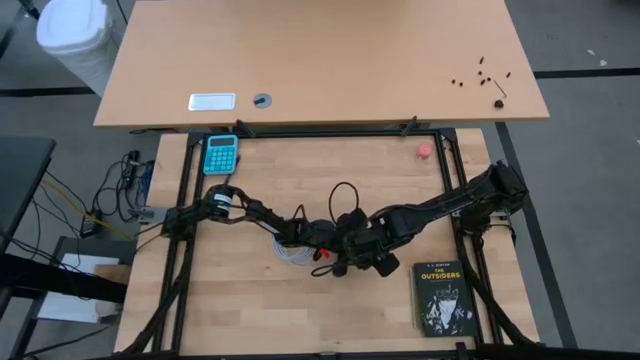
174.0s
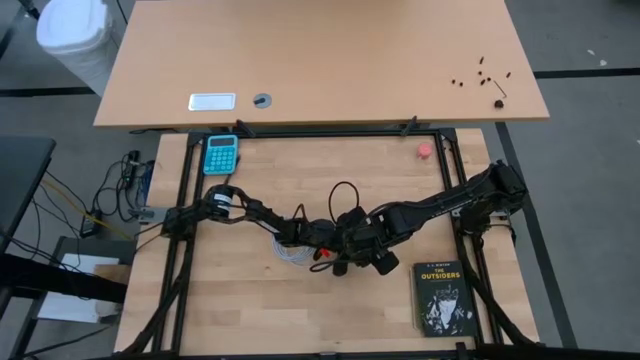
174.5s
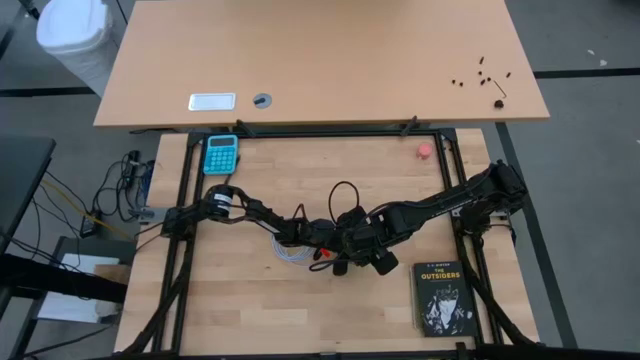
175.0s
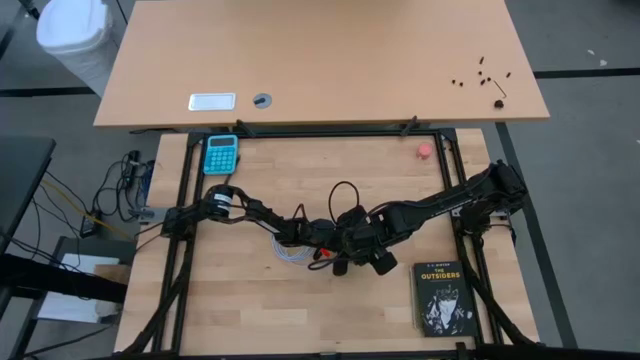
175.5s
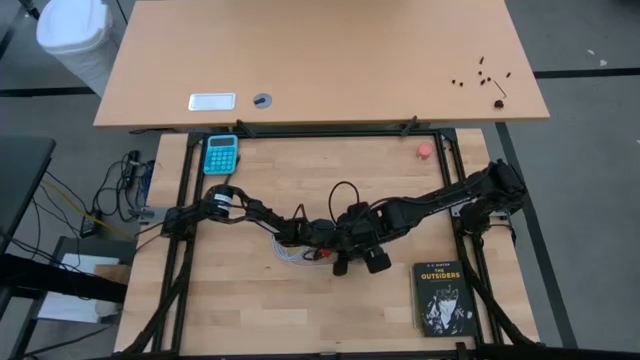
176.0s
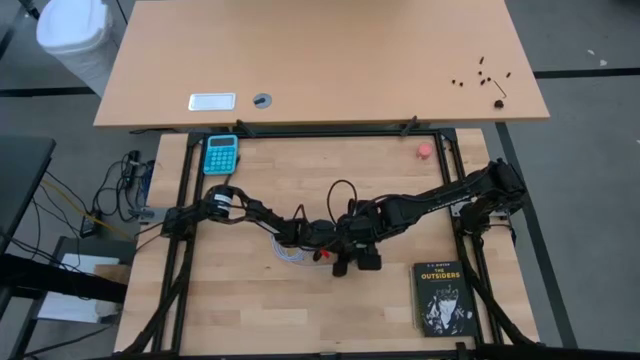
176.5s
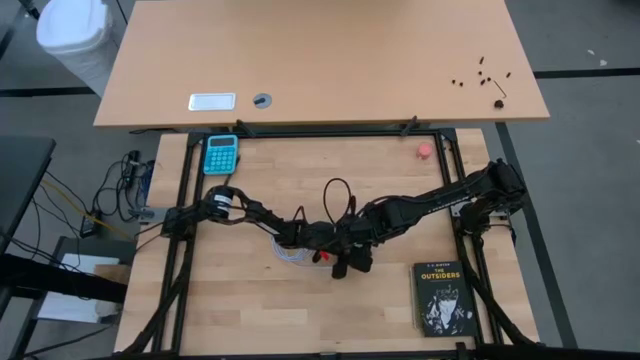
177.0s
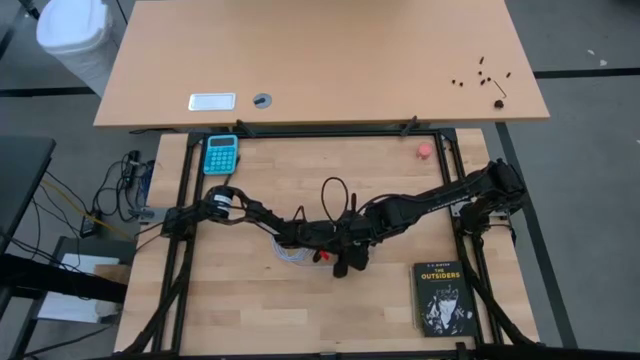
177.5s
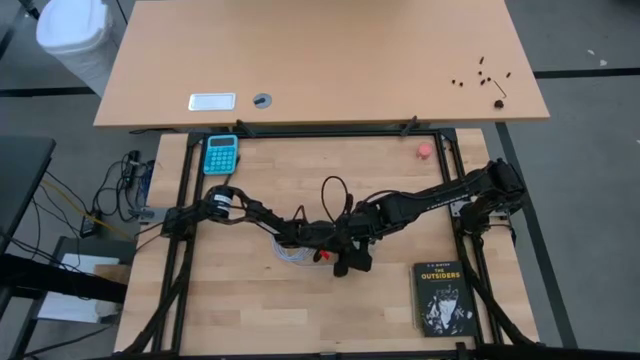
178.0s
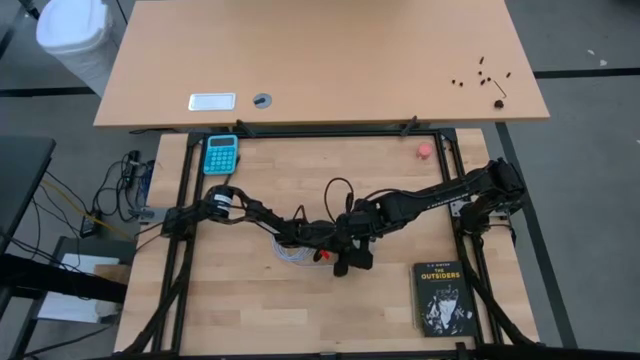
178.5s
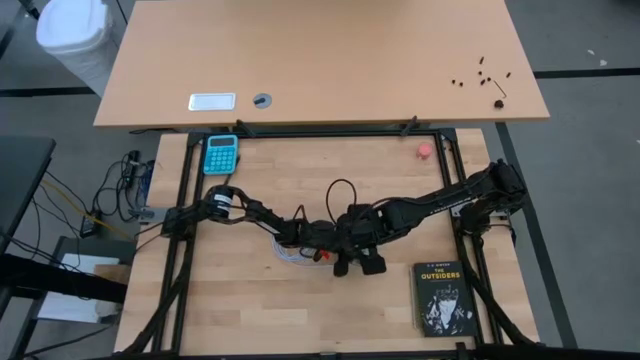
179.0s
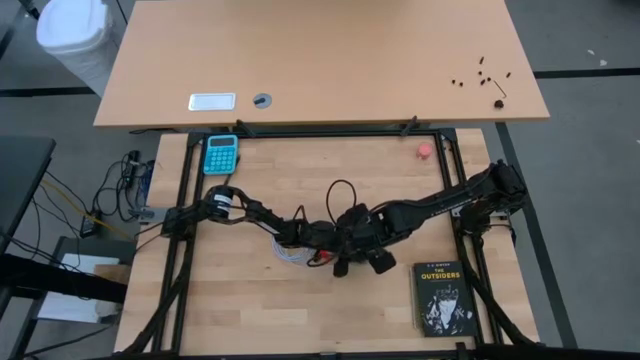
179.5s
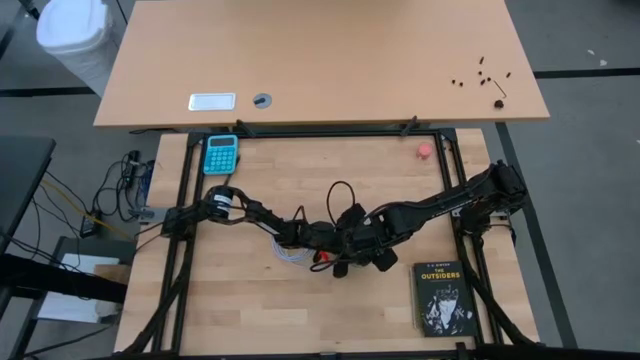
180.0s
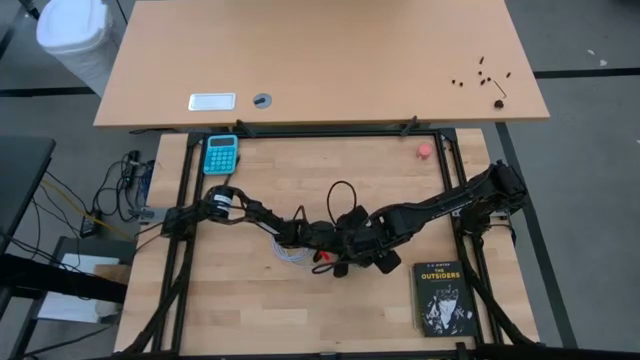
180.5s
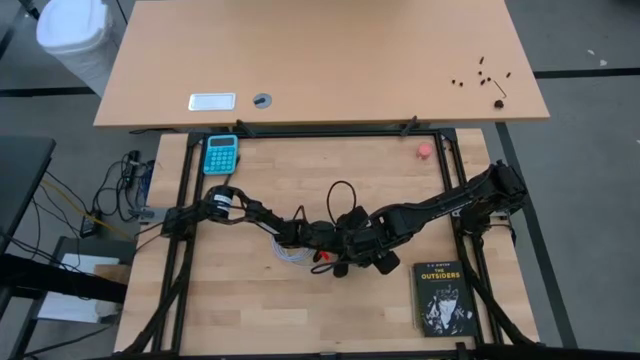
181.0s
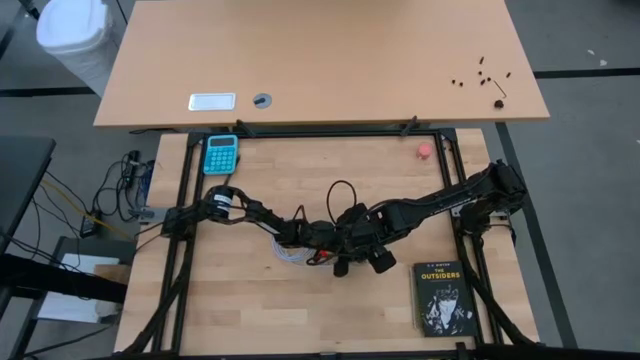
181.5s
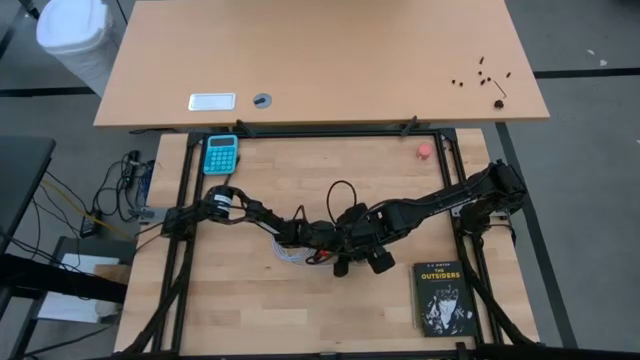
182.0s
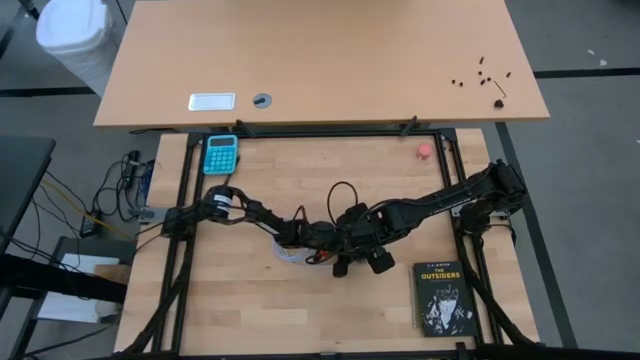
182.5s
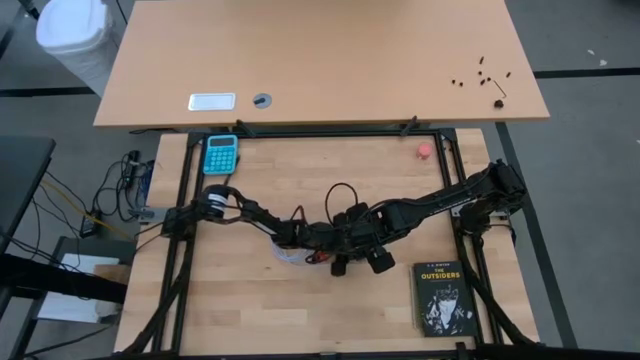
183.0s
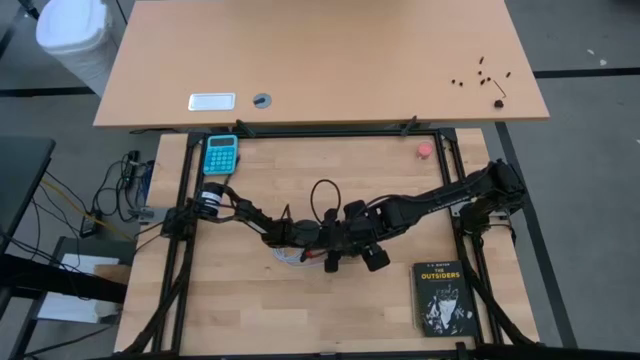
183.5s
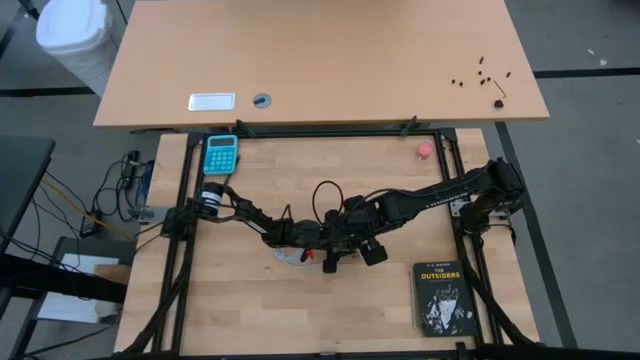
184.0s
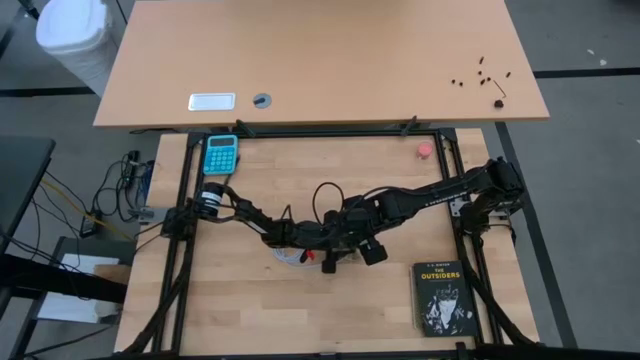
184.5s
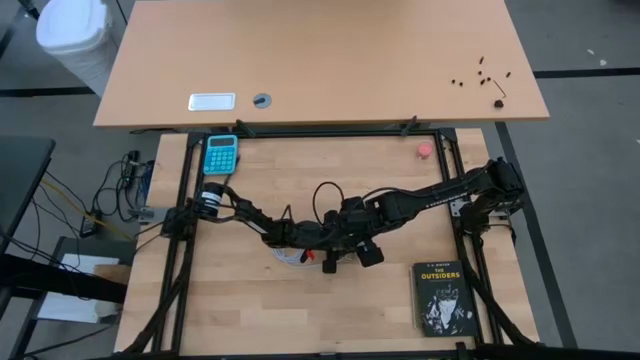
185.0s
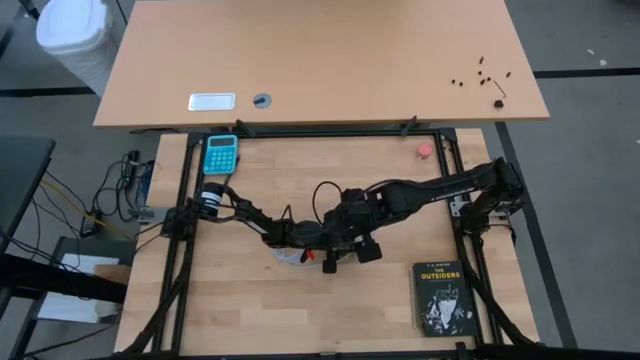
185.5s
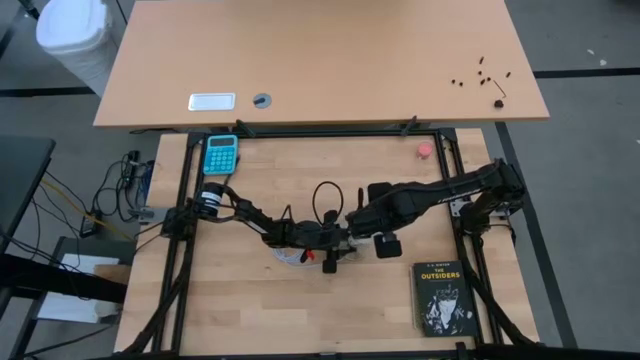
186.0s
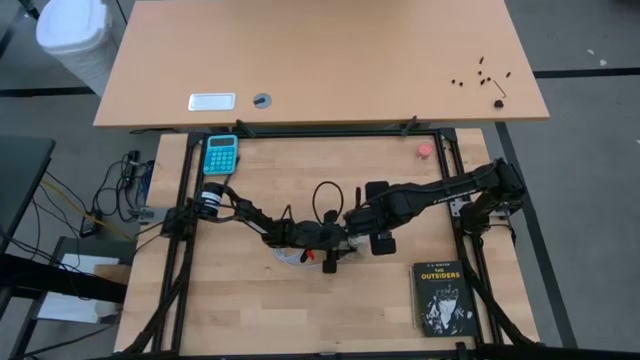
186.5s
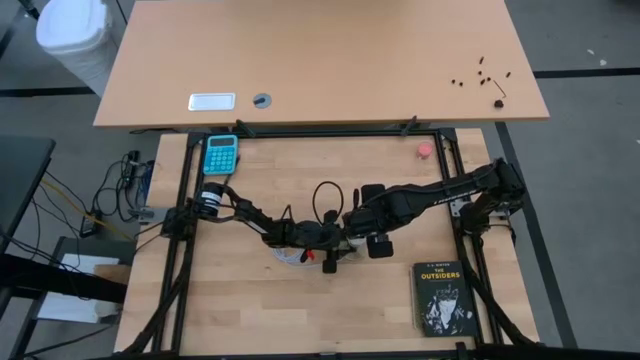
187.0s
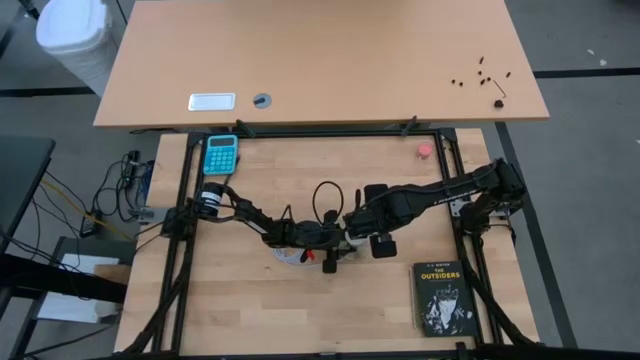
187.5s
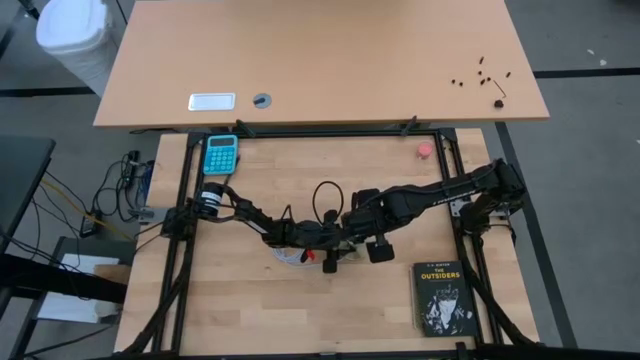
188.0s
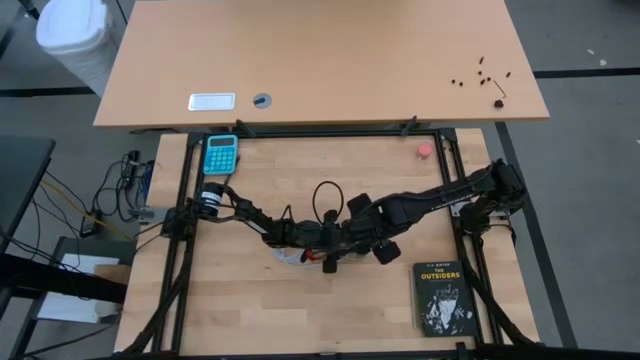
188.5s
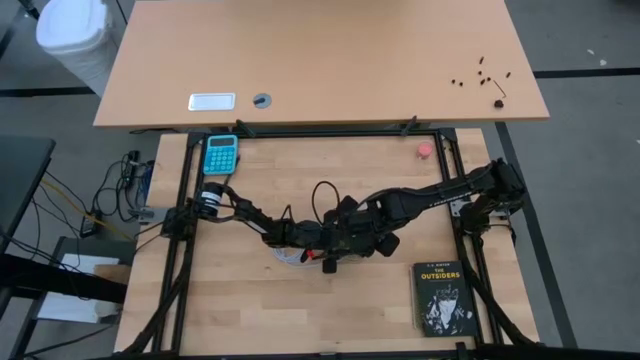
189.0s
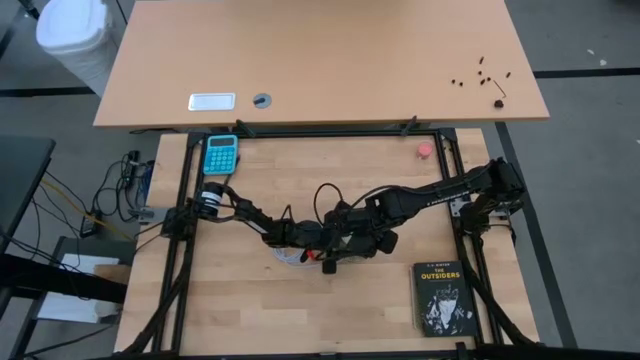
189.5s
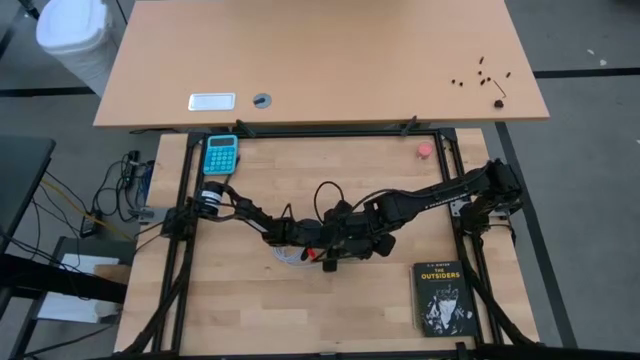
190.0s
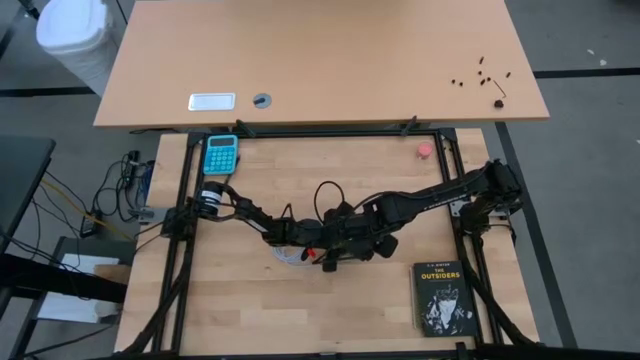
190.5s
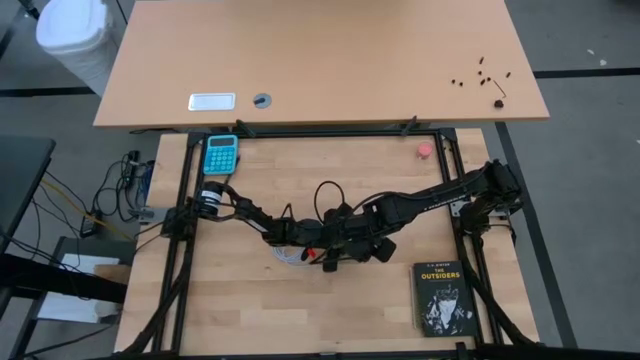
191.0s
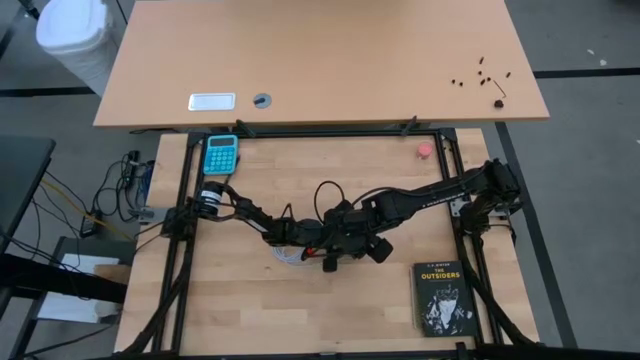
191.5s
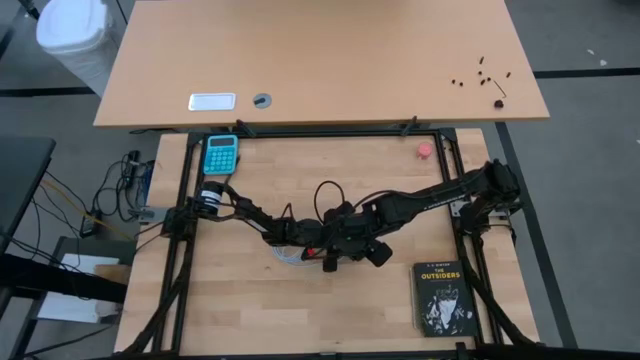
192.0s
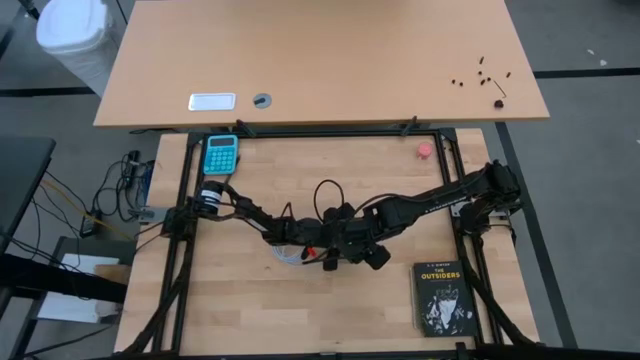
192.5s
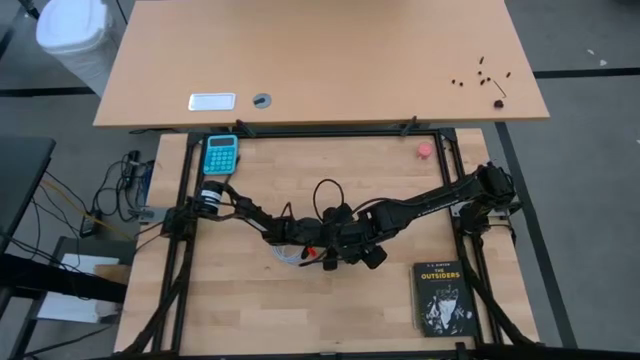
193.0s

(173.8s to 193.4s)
Task: Screw lightbulb
Insert the lightbulb into the lamp
